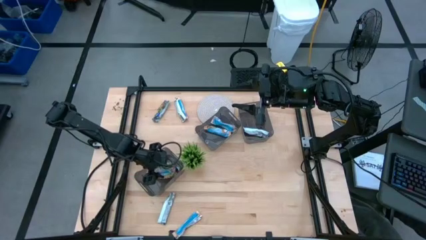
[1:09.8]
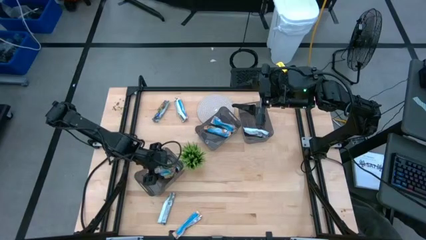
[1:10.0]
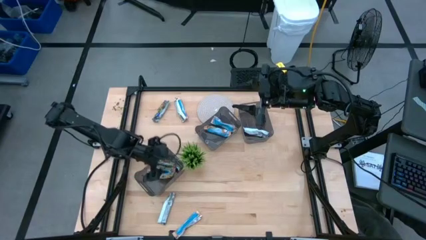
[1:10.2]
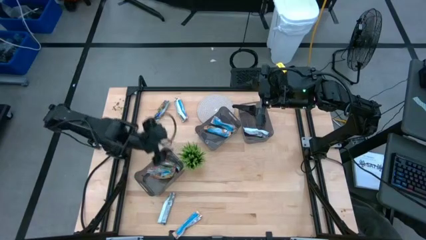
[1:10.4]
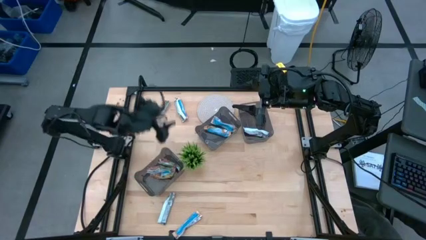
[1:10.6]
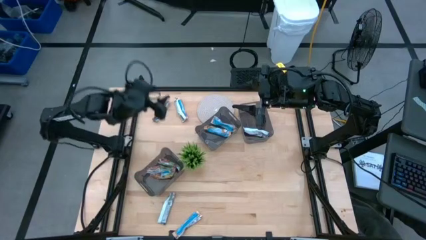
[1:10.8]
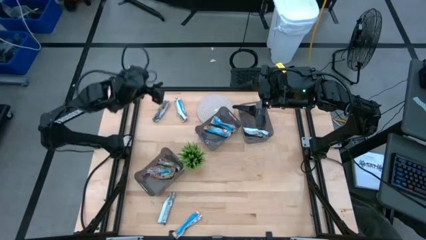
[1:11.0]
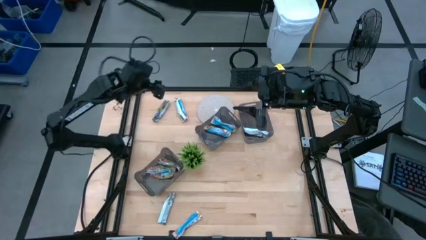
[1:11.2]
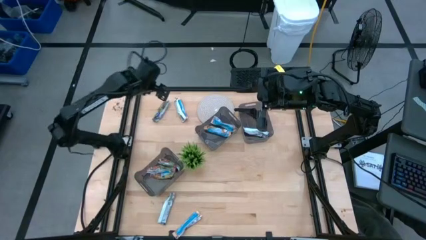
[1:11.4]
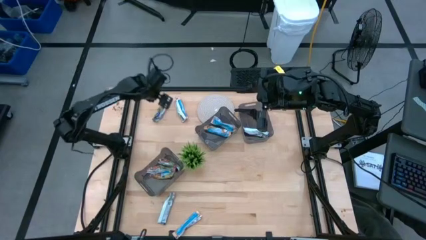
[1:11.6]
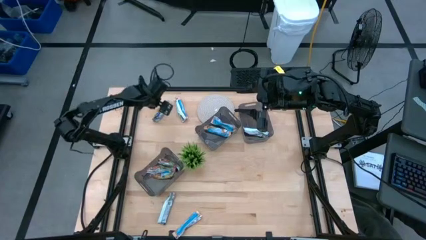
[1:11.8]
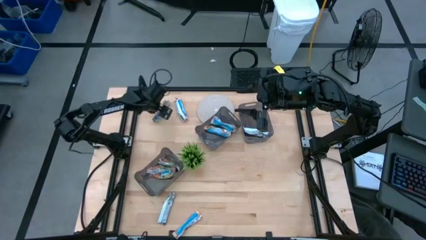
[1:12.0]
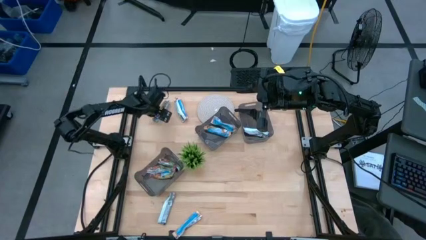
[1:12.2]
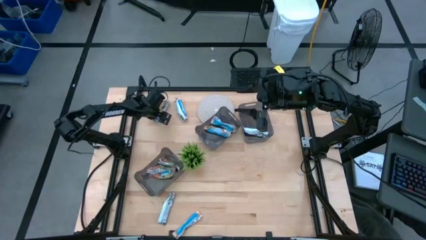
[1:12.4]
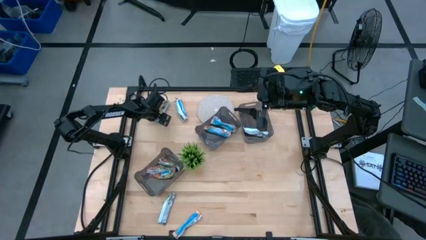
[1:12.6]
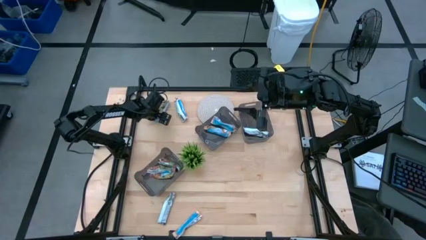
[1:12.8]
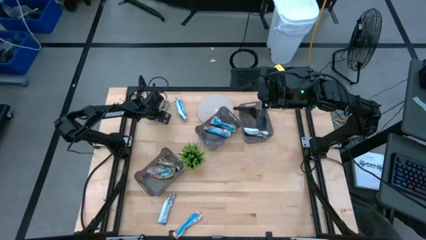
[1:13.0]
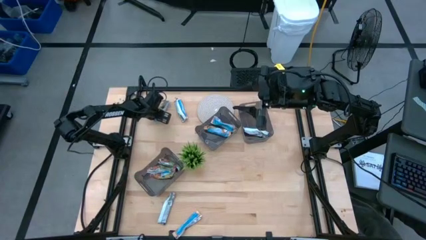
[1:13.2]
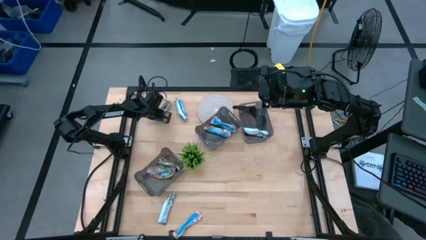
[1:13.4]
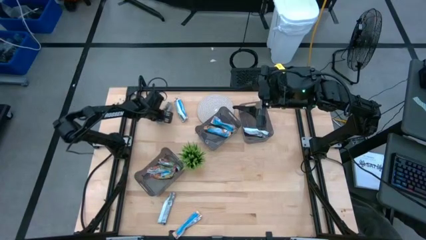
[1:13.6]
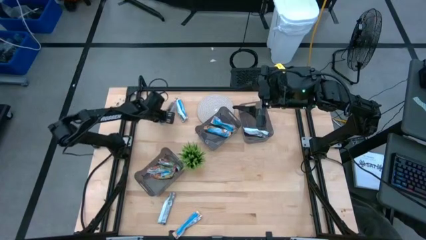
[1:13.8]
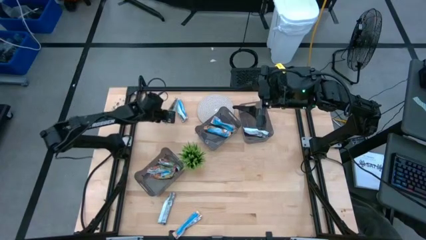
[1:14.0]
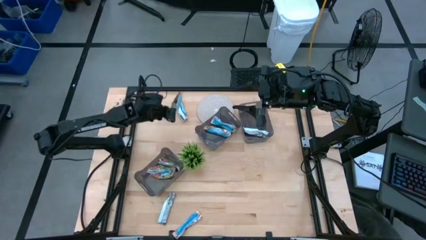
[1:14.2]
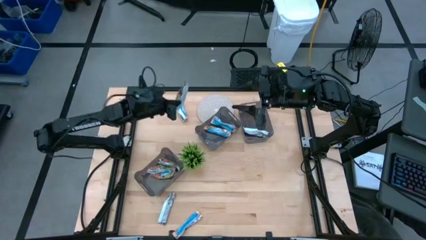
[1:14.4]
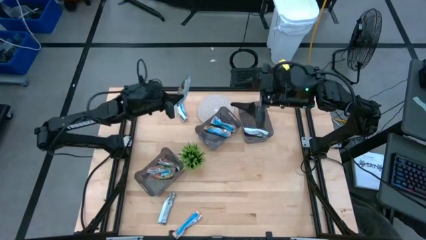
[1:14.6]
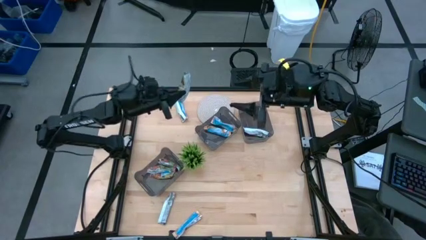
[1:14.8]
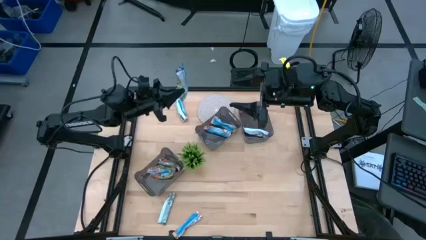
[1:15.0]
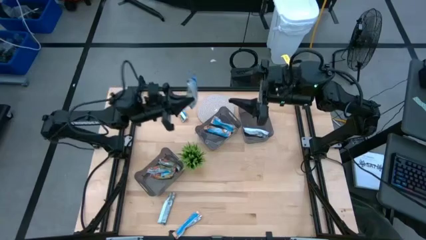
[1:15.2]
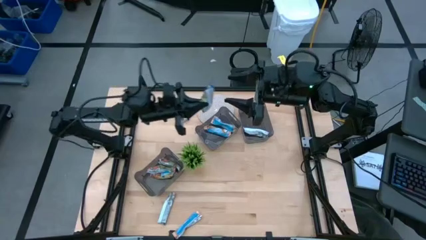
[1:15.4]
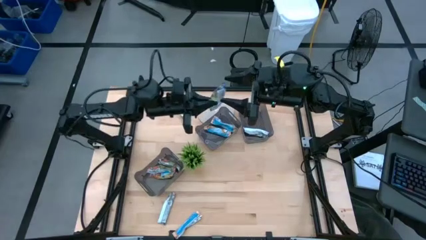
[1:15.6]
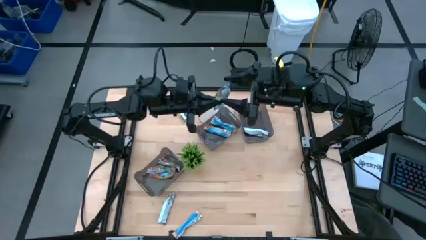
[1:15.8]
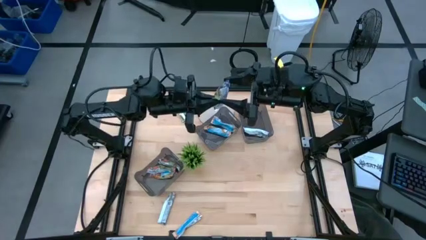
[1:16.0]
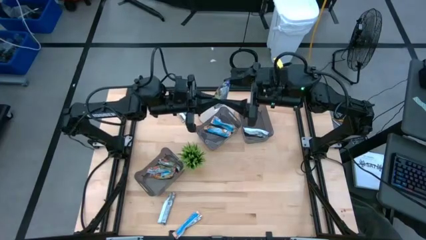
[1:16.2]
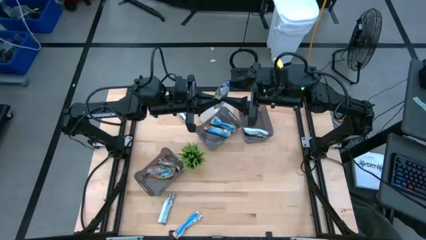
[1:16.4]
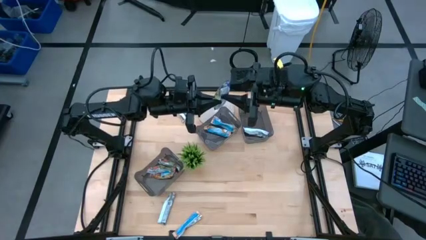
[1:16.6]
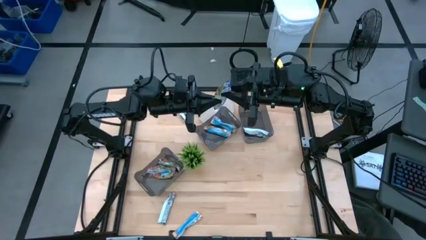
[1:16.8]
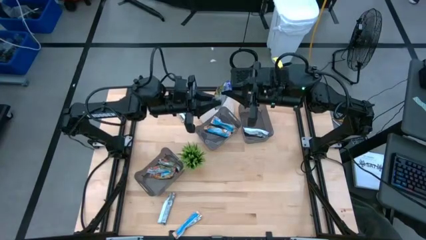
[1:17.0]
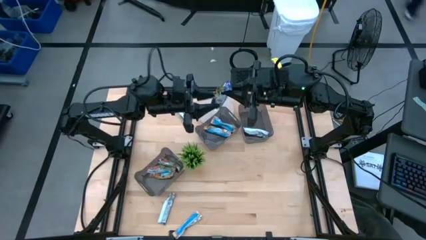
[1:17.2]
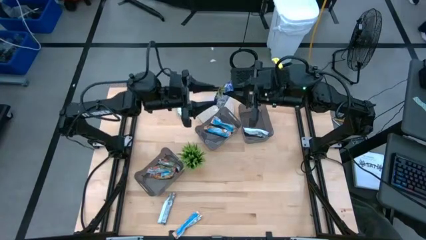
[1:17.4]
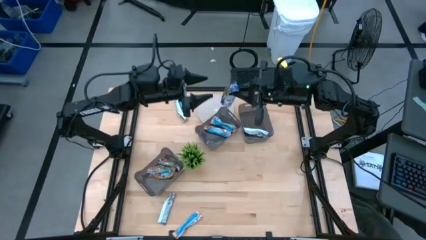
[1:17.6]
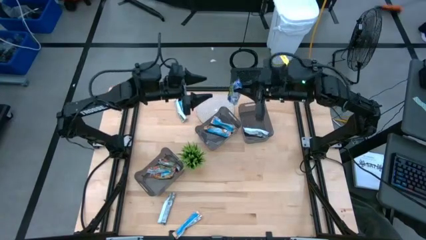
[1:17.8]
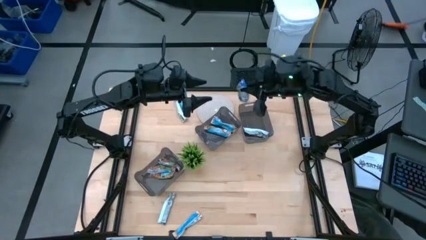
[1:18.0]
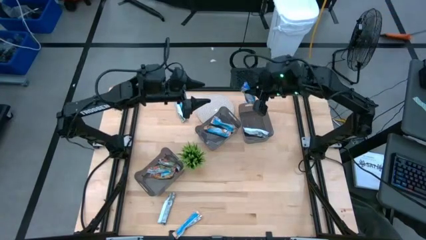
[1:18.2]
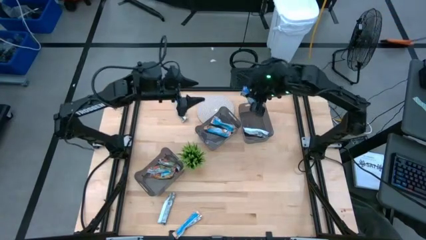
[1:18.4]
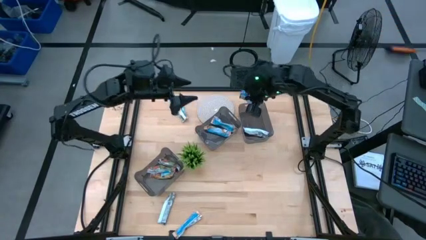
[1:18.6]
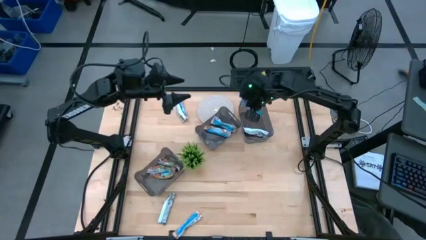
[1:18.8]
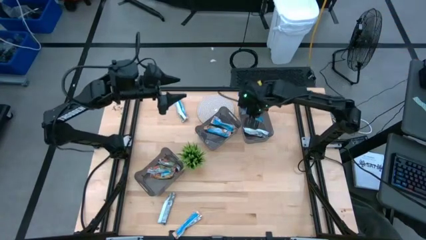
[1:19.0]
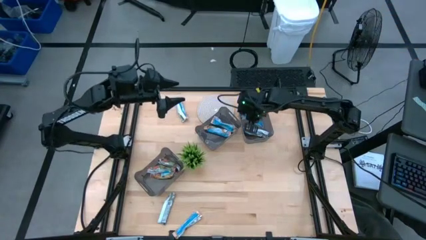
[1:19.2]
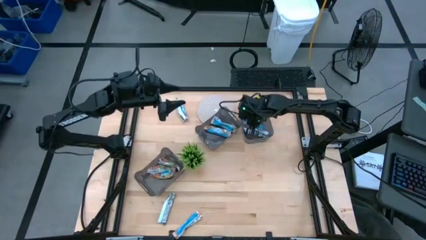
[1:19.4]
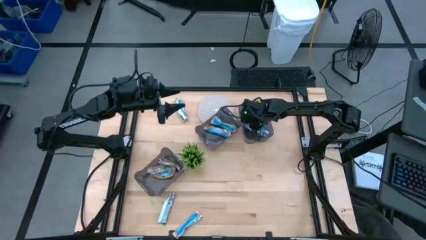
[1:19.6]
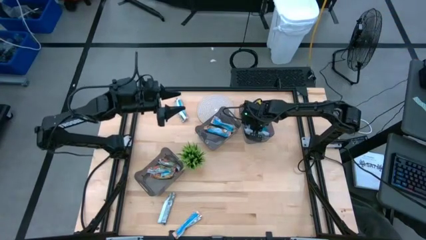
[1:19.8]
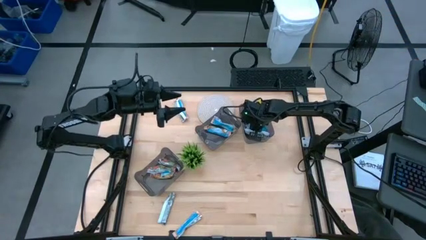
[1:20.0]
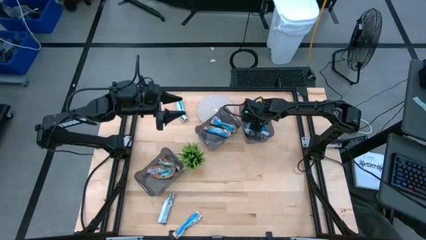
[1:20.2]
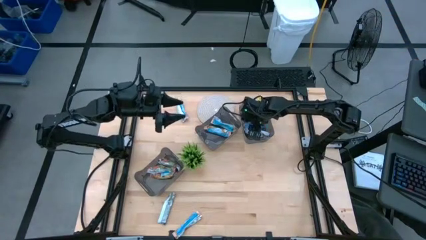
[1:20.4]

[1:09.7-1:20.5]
Task: Pick and place Granola Bars by type
Put the blue granola bar into the top right black bin

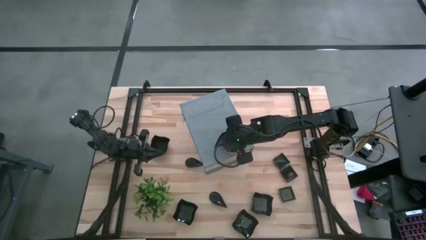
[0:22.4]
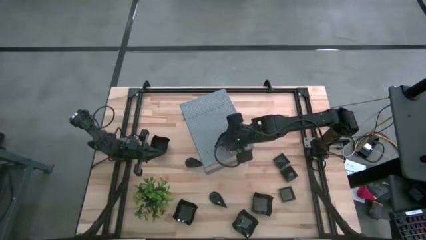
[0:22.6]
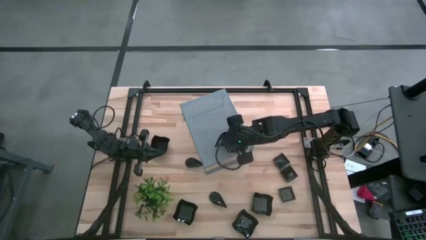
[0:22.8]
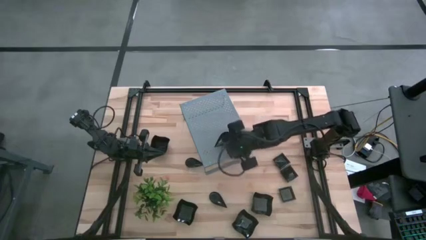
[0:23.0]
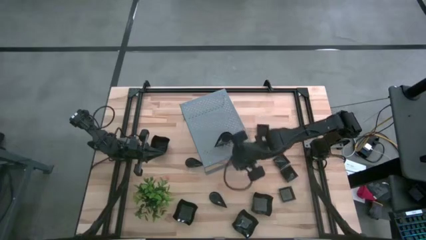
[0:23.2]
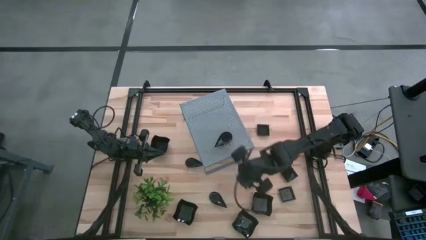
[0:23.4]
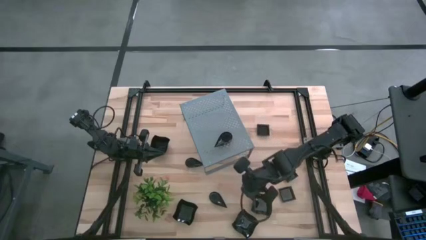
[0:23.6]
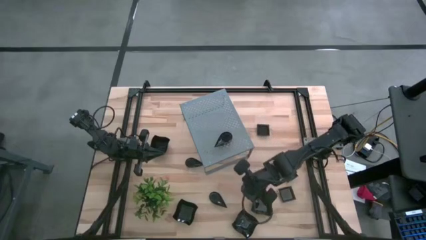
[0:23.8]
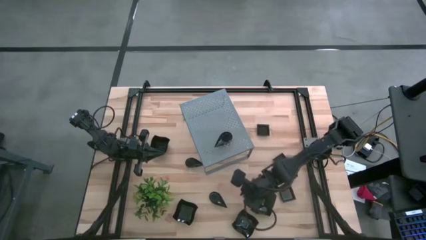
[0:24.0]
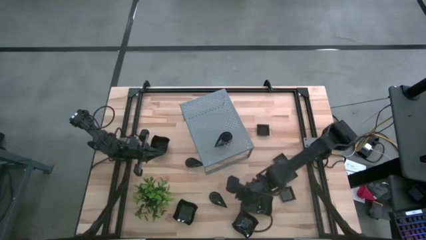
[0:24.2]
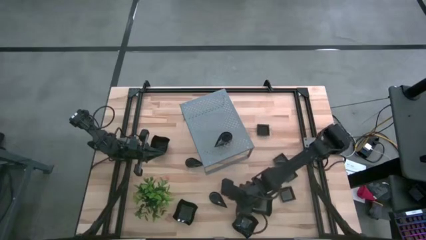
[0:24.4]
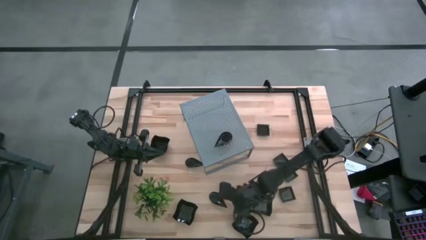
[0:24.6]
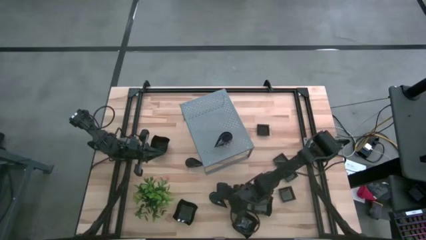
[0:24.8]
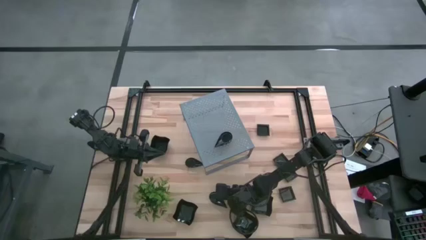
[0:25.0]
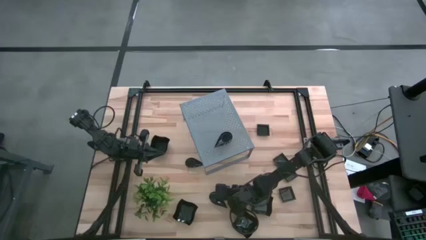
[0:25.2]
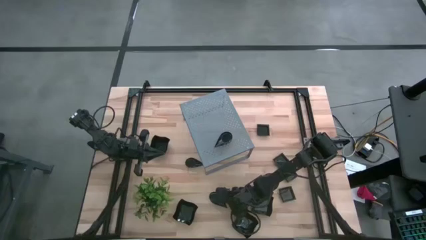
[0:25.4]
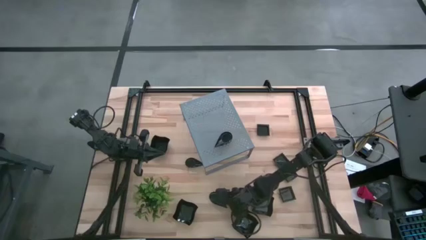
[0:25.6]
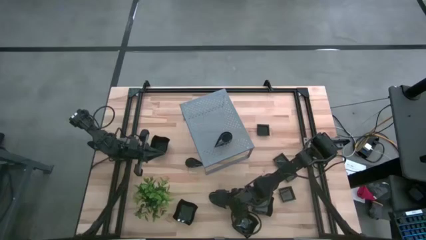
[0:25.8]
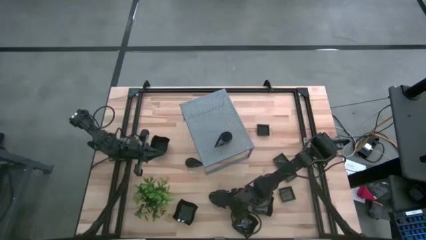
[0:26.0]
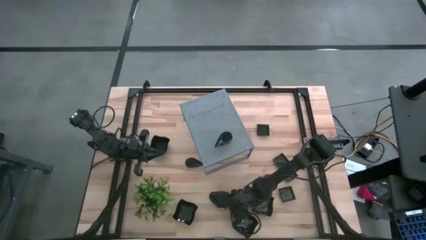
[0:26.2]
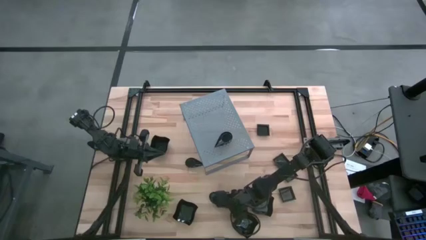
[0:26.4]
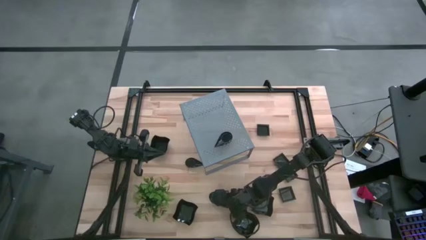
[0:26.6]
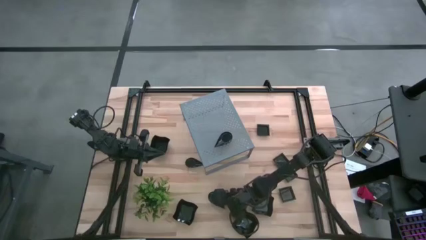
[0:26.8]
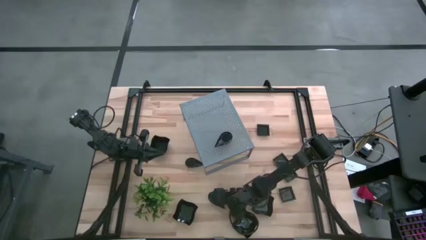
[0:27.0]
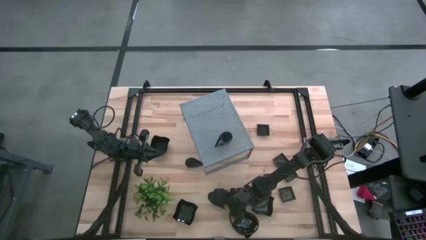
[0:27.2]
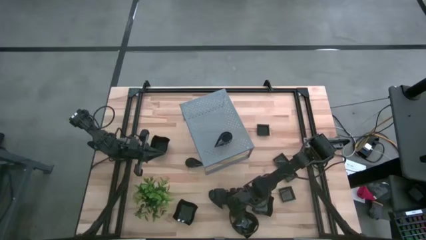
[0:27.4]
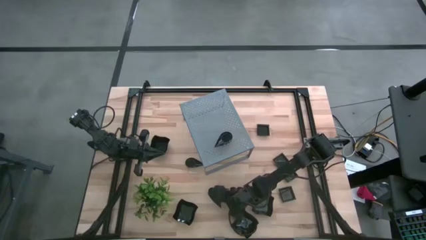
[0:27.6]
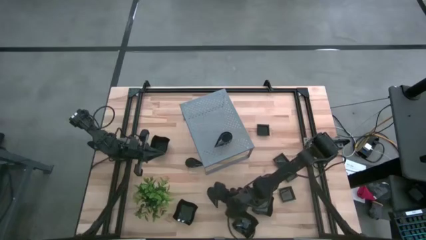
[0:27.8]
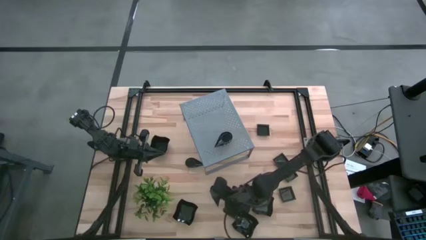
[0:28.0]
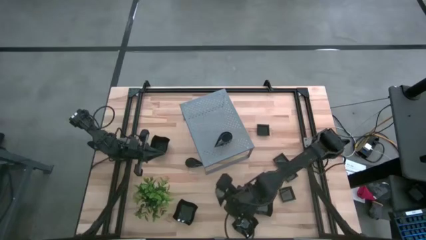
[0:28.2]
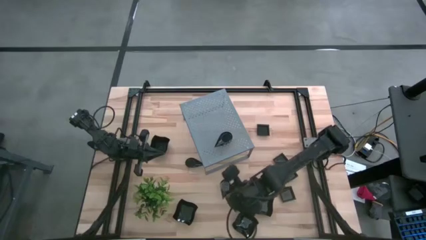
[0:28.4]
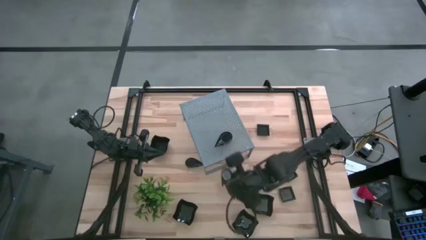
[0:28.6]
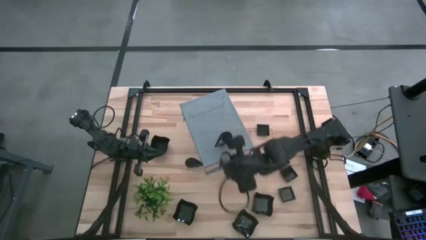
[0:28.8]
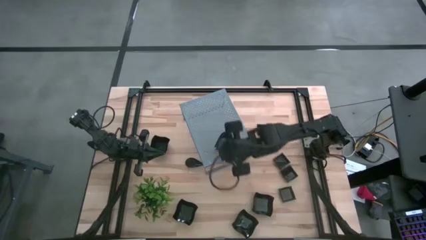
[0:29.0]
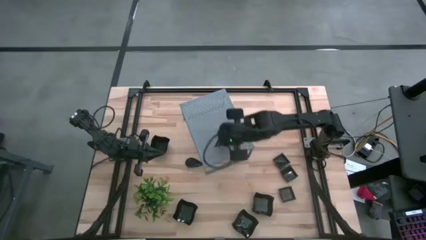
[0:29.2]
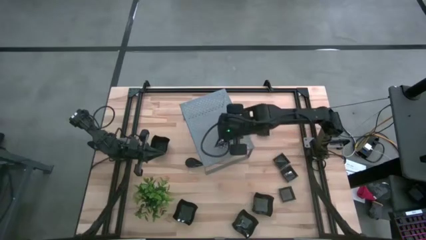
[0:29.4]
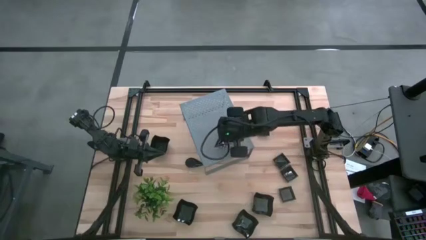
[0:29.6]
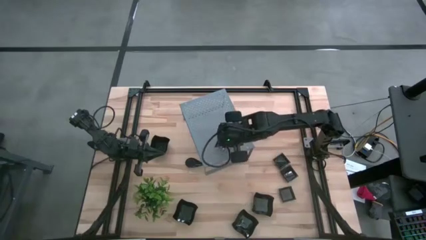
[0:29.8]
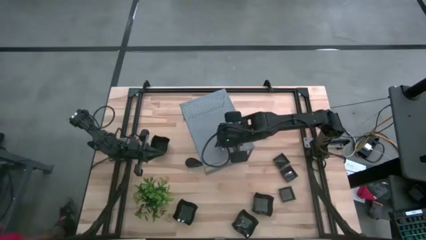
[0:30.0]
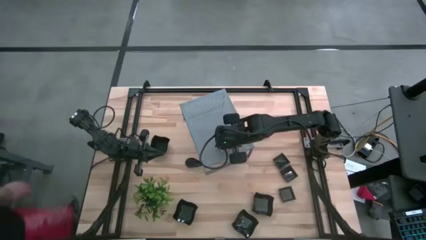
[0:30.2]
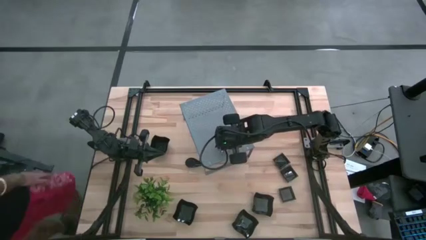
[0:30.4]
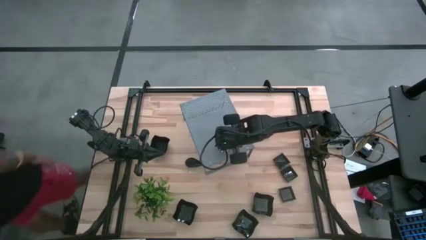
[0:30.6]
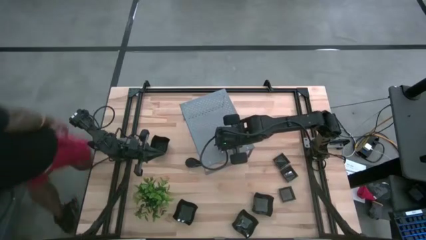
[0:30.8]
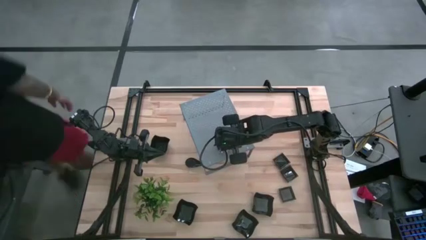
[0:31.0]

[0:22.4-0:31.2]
Task: Pick & Place Mini shaped plates
Stack the drop-shaped plate on top of the drop-shaped plate on the shelf
